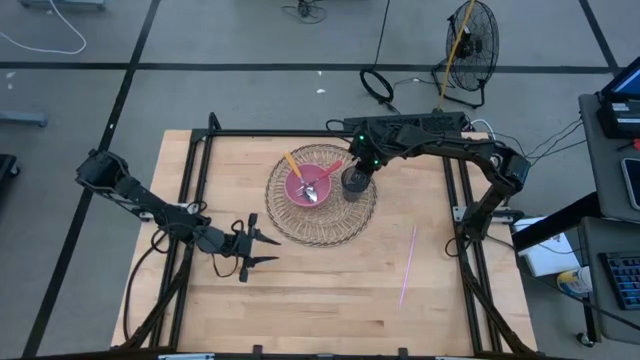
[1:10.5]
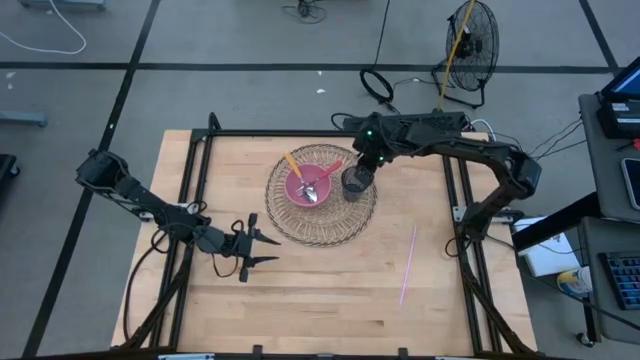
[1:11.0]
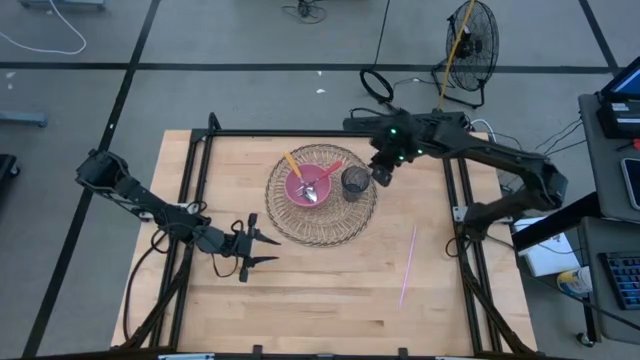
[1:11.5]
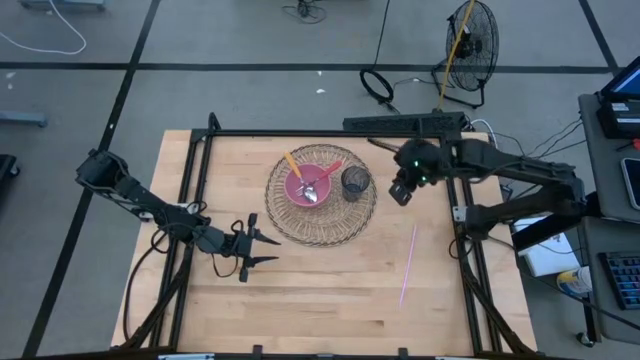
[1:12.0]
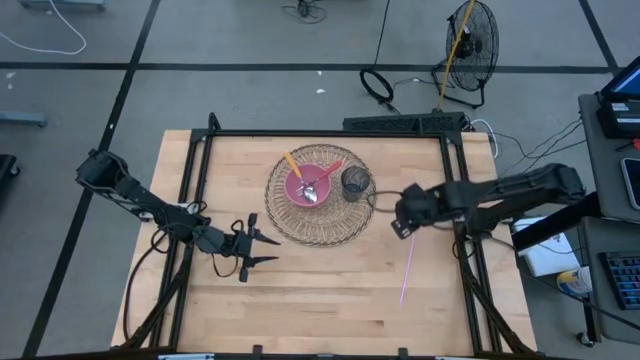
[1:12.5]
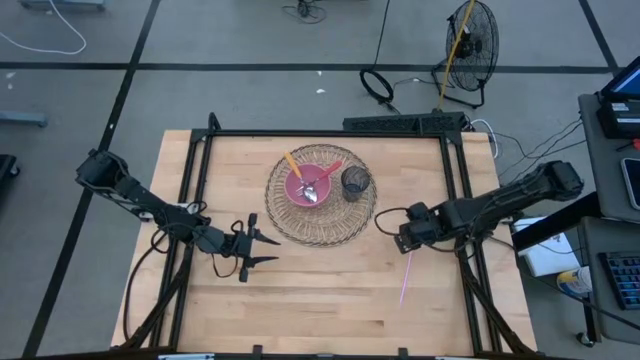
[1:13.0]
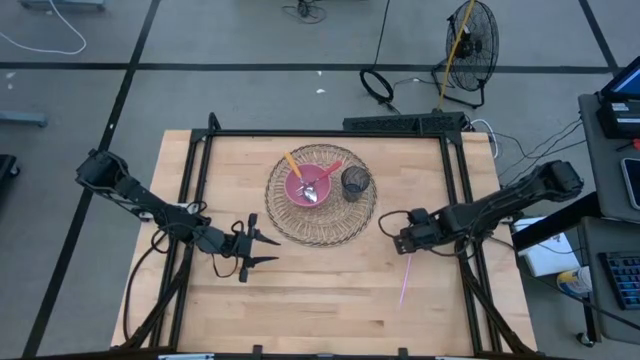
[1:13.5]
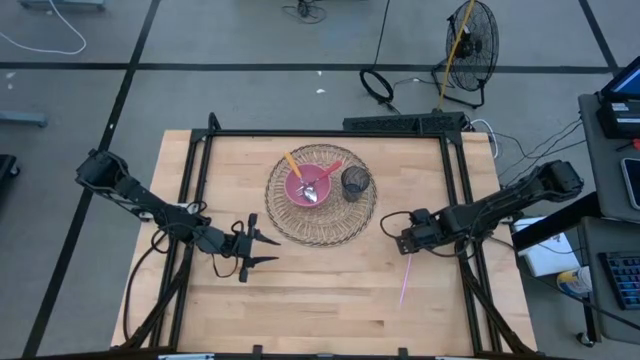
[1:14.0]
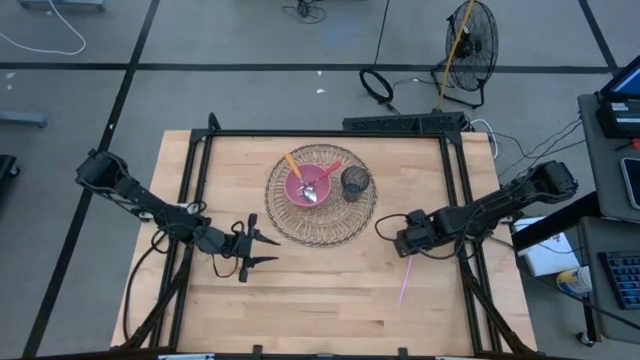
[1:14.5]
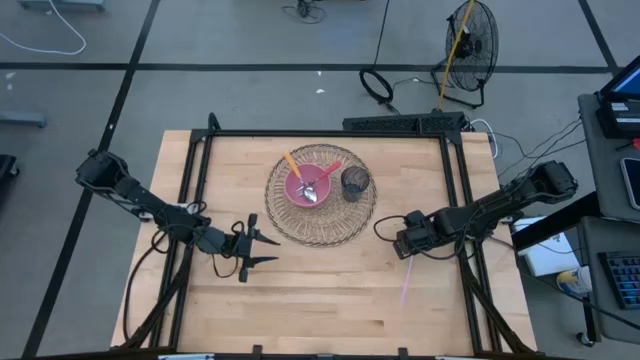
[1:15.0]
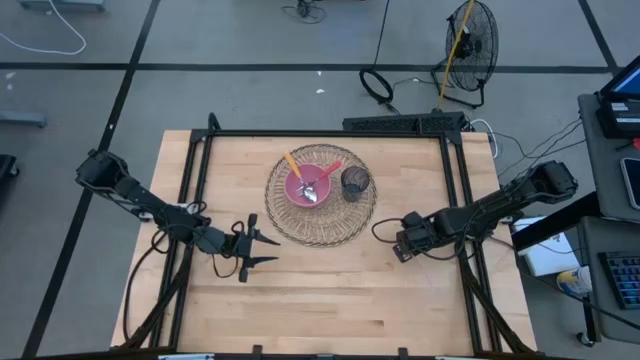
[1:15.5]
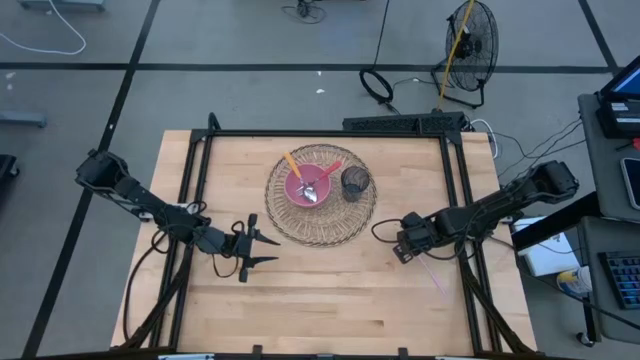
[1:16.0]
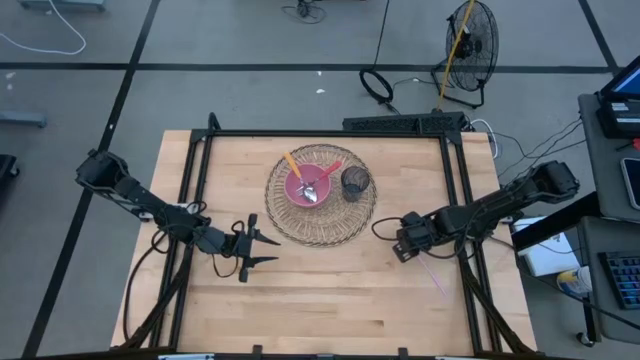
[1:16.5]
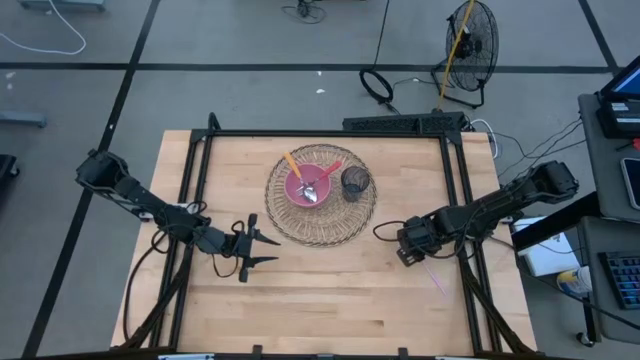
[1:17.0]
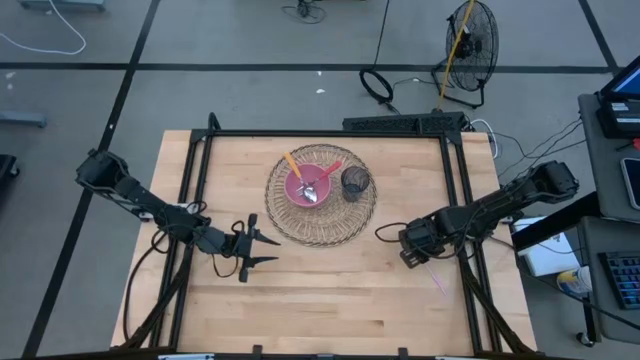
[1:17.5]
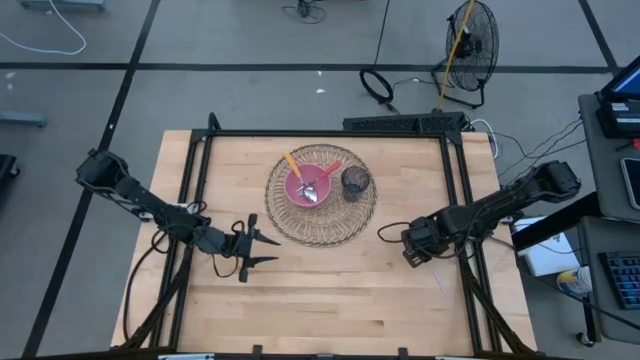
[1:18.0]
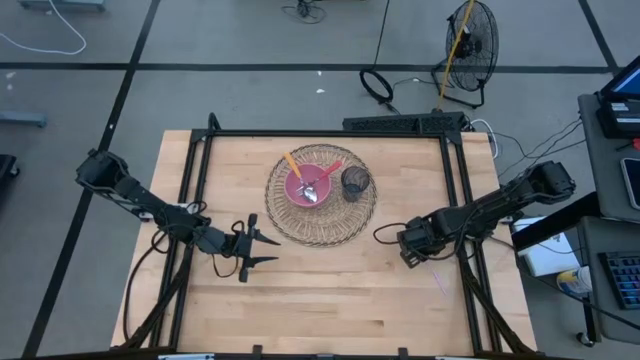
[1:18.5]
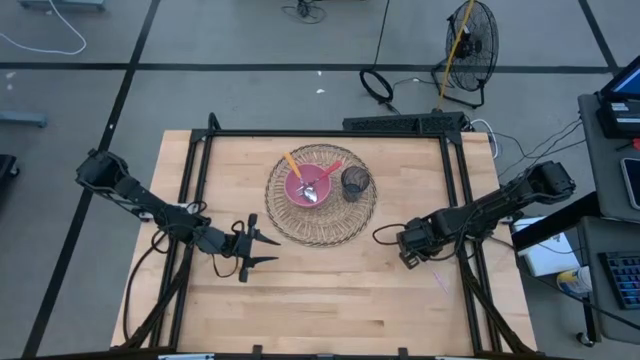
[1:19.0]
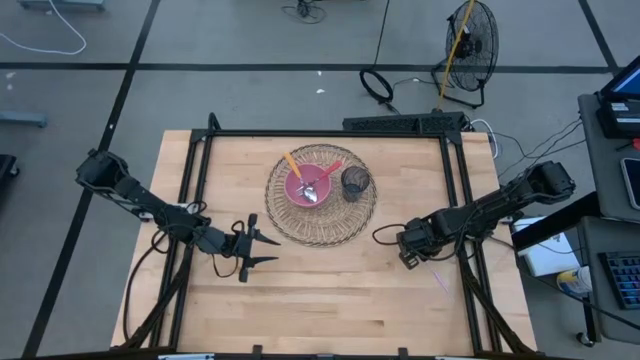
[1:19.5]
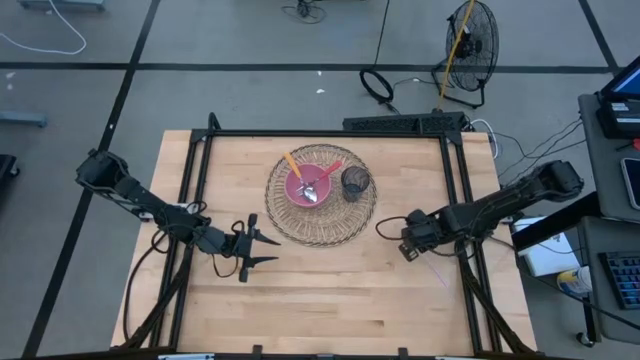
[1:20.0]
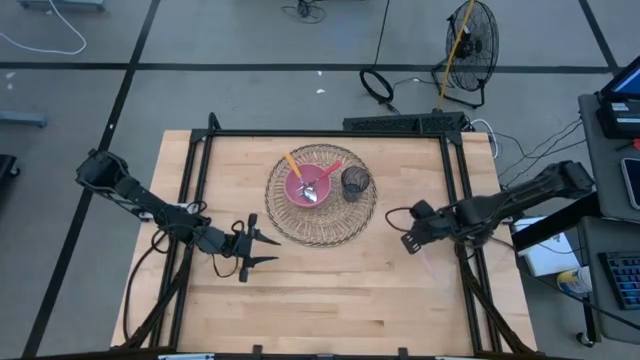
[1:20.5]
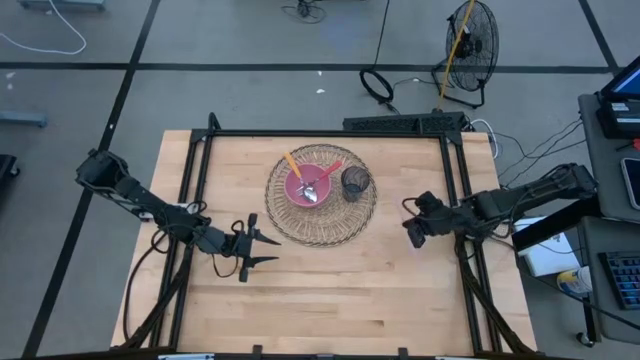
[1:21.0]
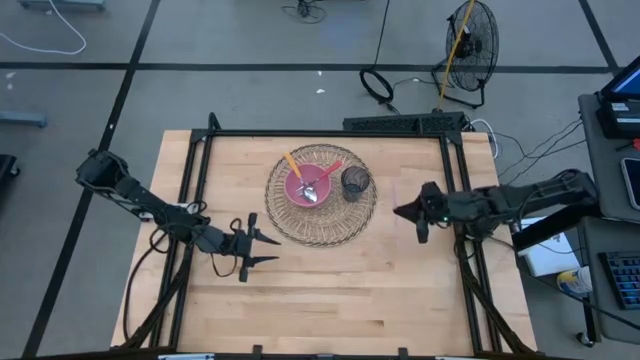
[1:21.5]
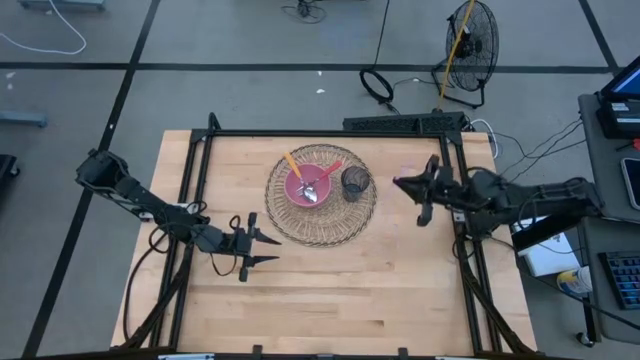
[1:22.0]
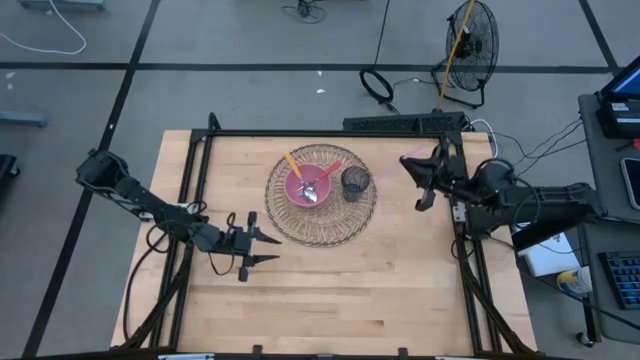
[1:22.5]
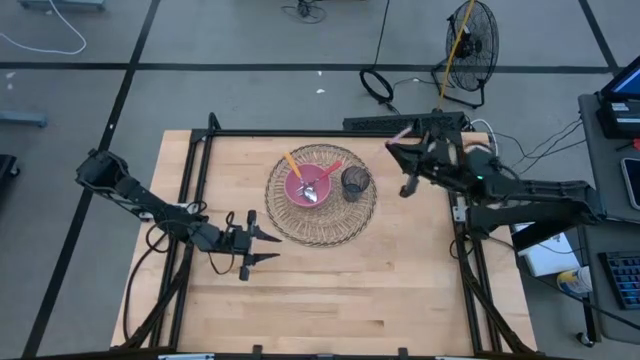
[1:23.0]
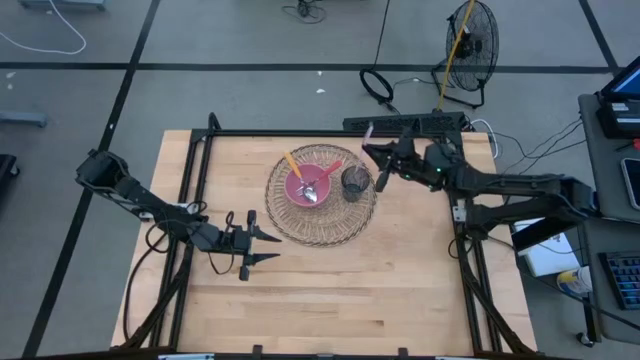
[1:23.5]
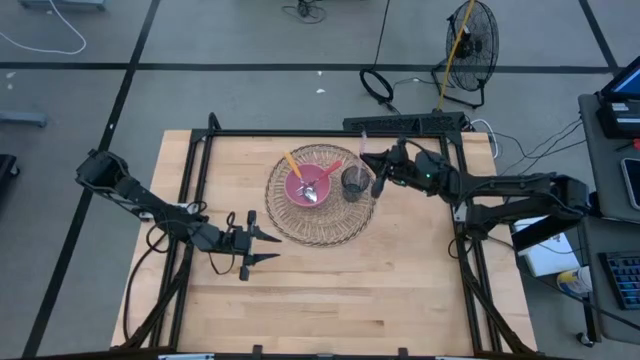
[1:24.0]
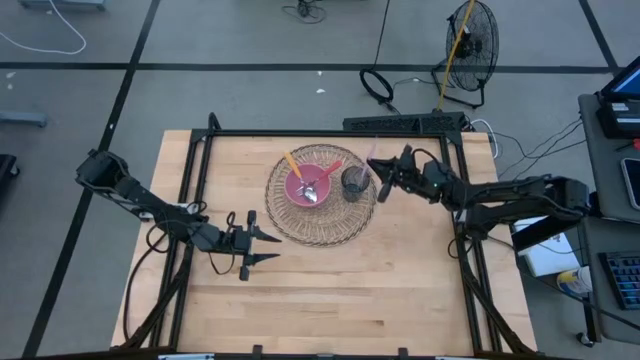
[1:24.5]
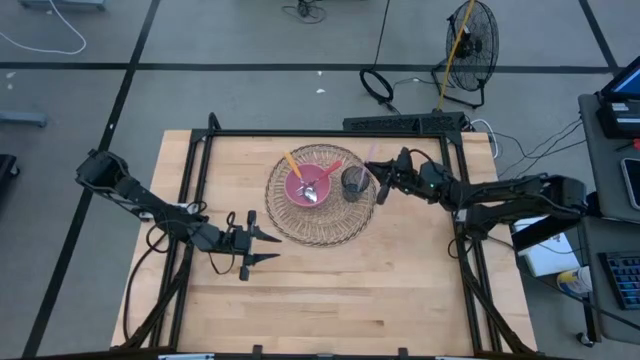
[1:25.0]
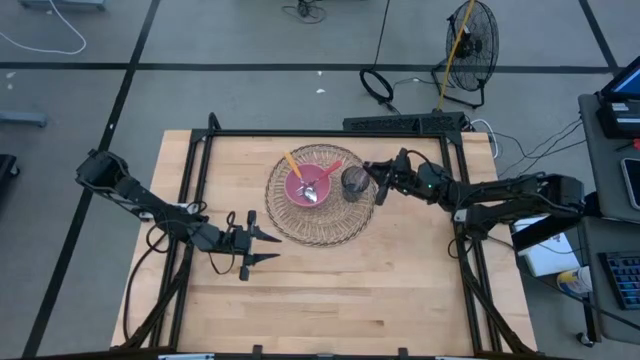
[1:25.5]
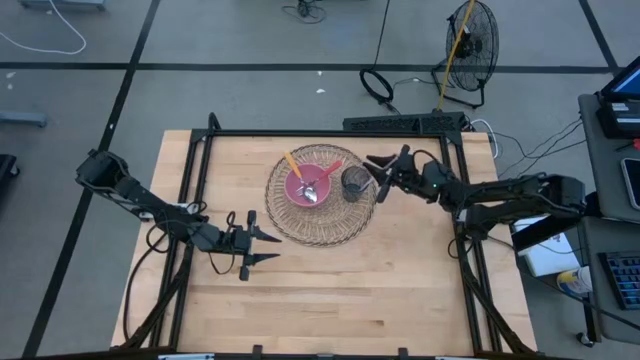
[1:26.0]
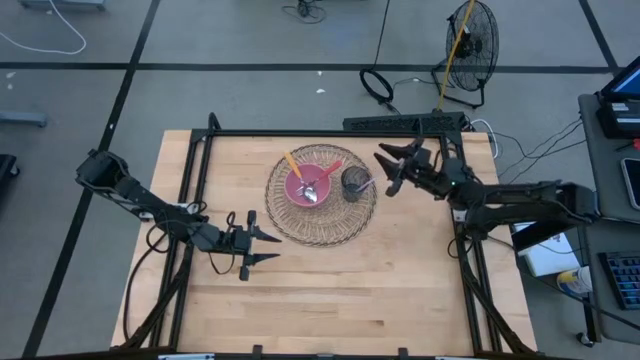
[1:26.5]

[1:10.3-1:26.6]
Task: Pick & Place Utensil
Put the pink straw into the blue cup on the woven mat

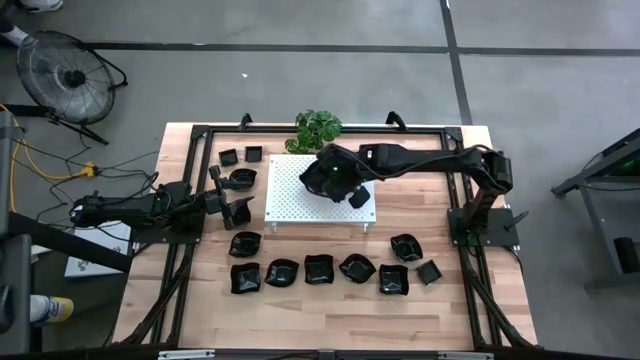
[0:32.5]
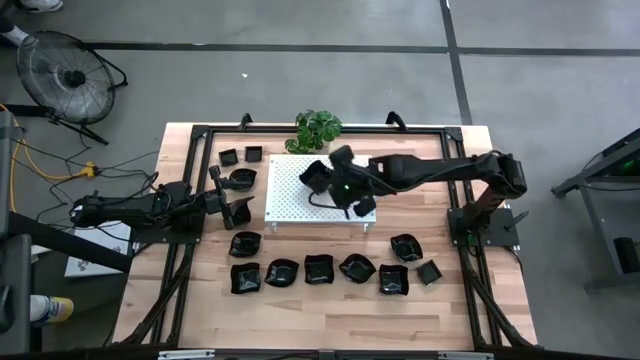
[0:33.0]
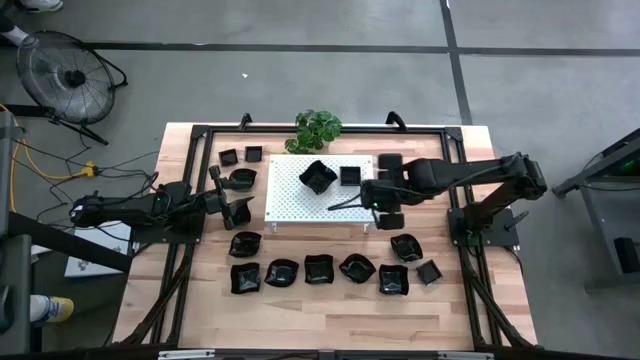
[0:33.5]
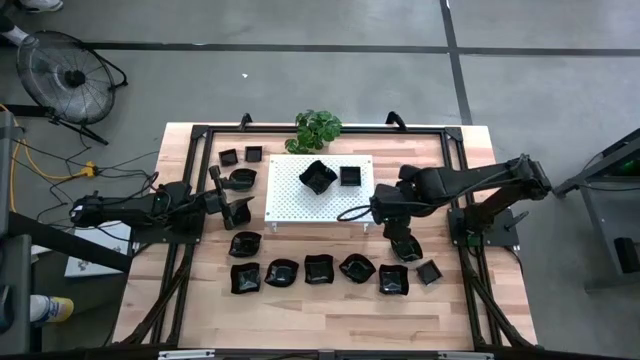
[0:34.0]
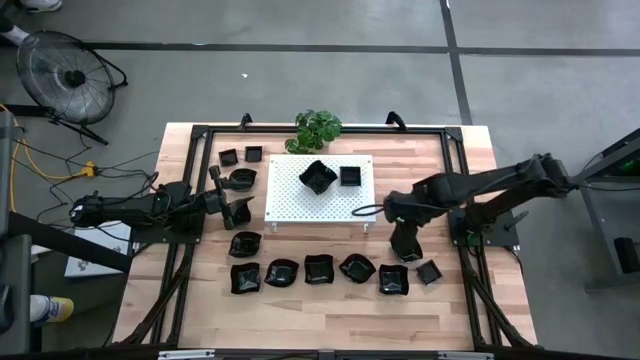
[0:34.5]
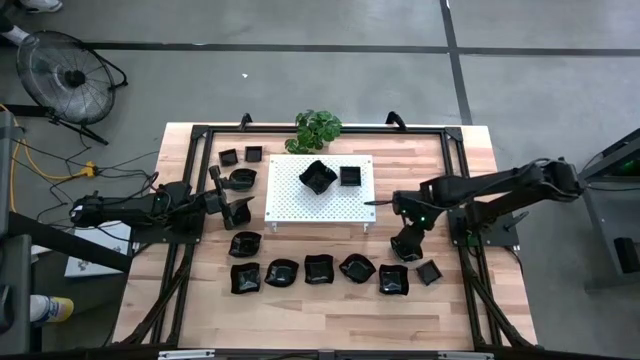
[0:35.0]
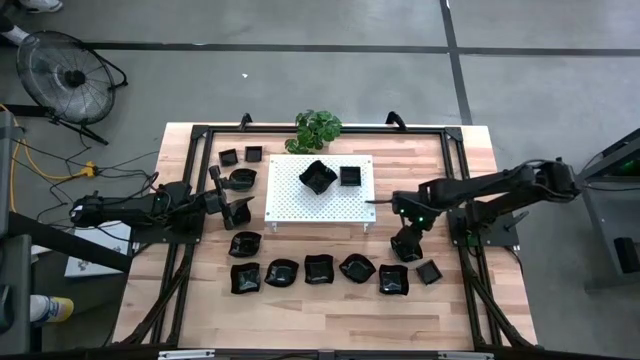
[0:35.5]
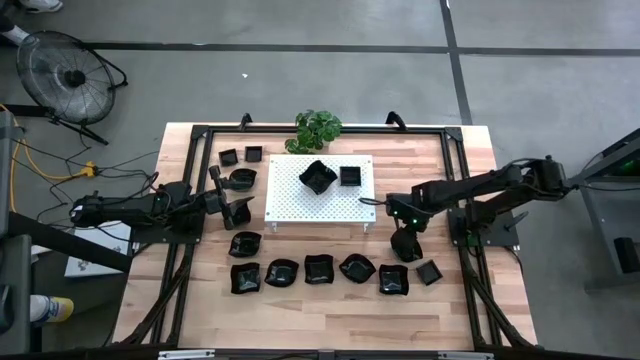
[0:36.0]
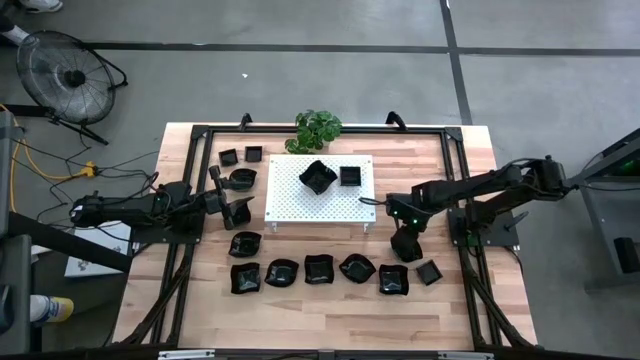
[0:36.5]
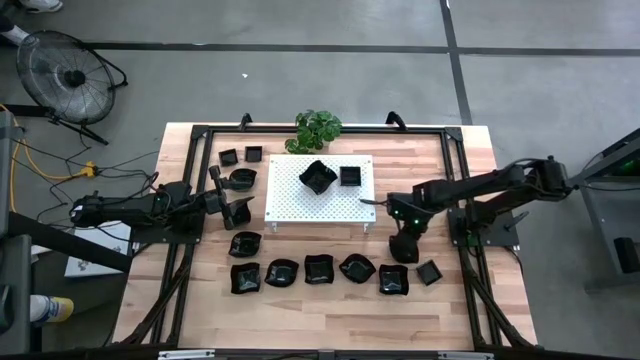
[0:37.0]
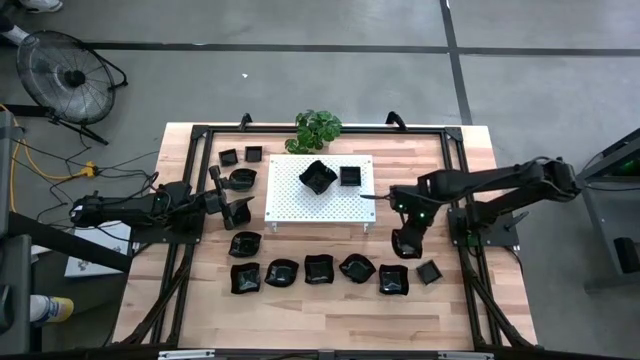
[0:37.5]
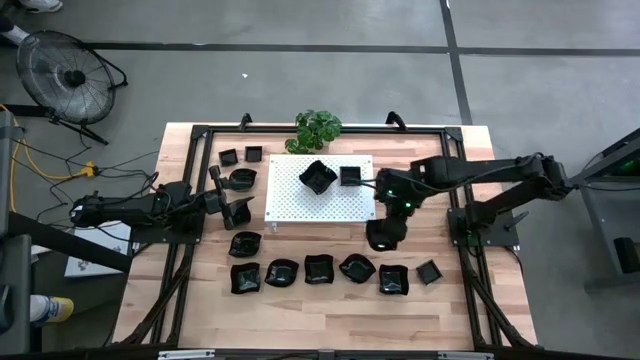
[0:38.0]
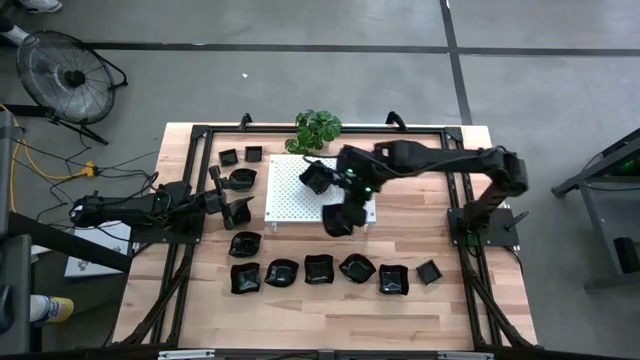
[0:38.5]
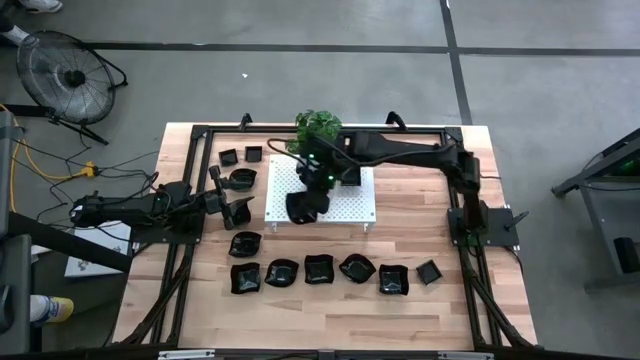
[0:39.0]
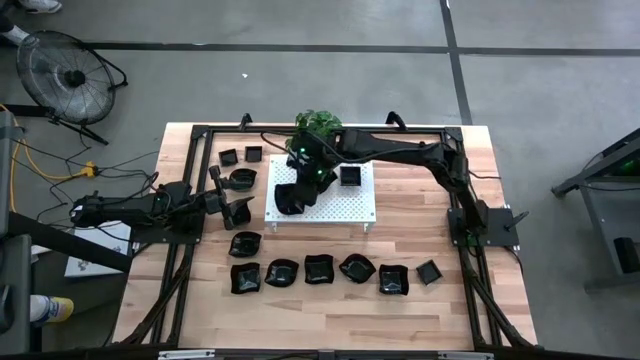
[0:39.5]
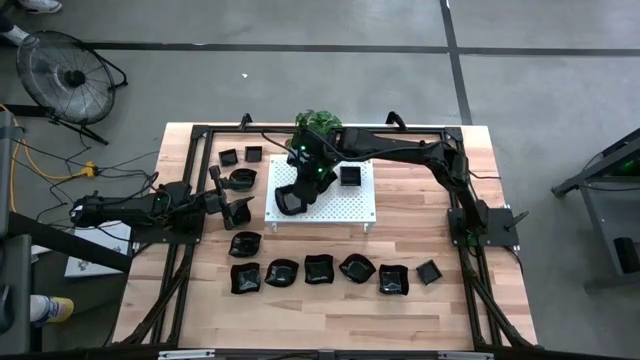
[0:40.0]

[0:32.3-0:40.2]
Task: Pick & Place Mini shaped plates
Put the leaf shaped plate on the shelf
